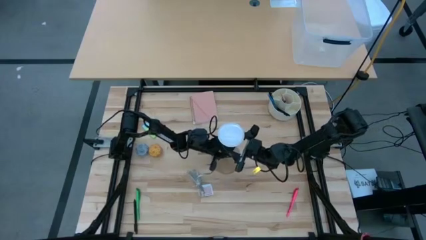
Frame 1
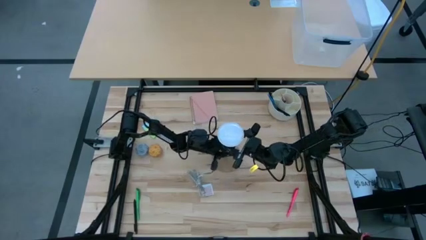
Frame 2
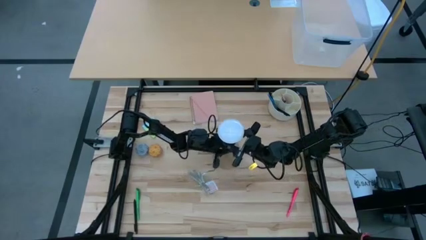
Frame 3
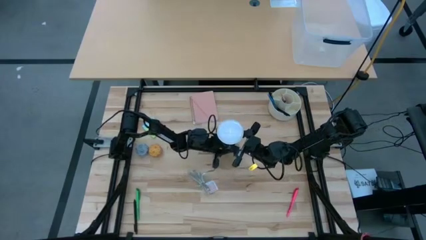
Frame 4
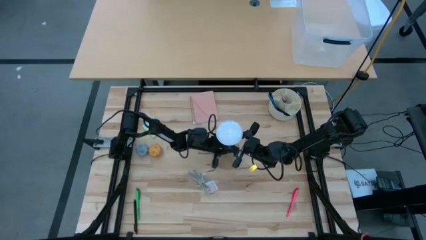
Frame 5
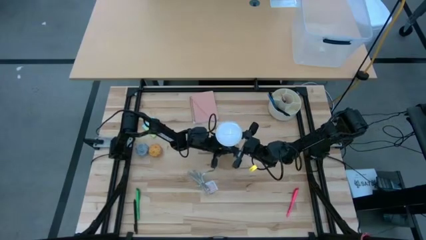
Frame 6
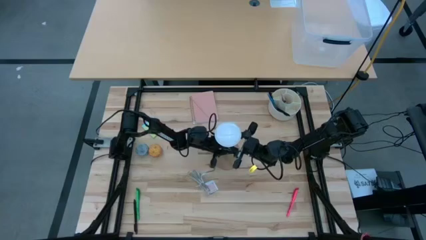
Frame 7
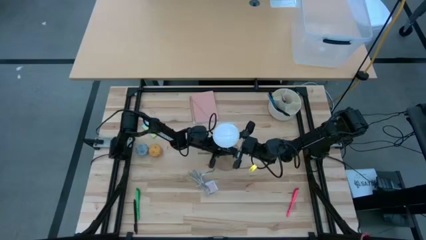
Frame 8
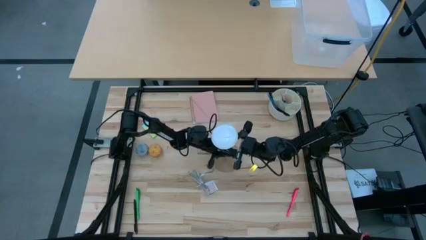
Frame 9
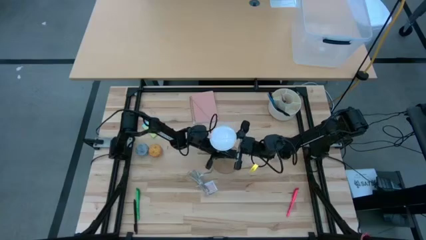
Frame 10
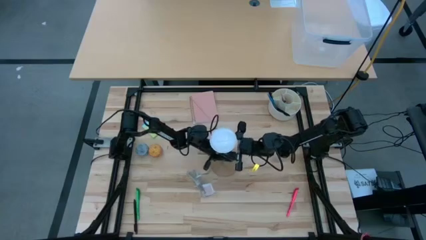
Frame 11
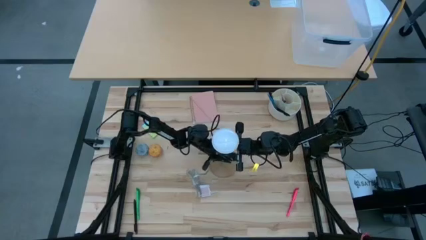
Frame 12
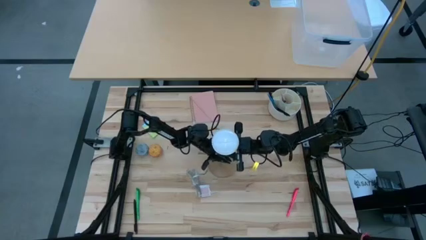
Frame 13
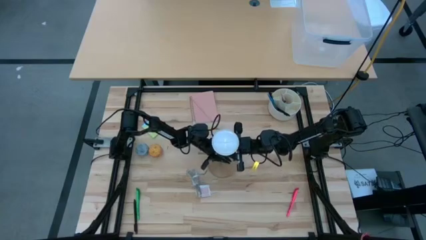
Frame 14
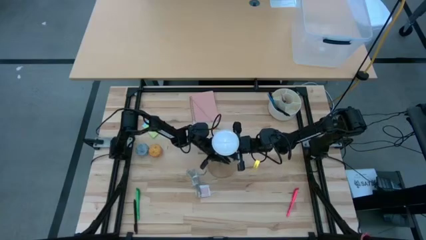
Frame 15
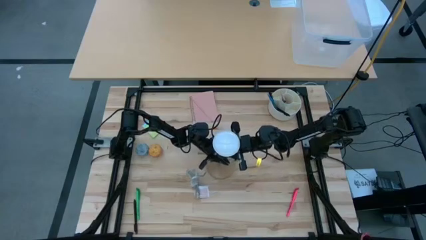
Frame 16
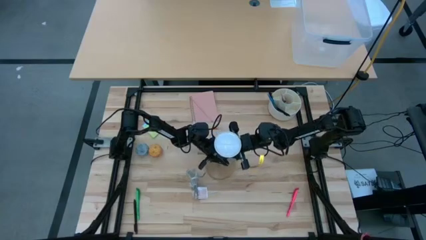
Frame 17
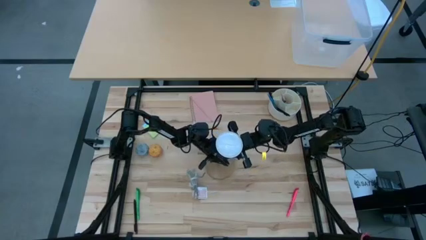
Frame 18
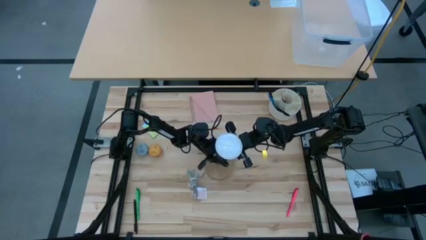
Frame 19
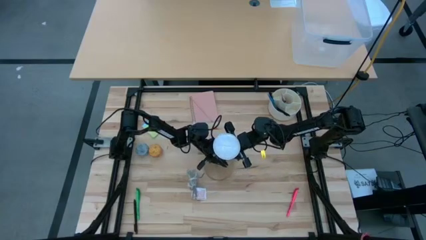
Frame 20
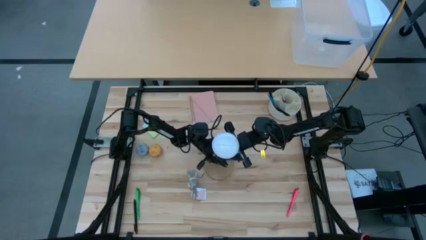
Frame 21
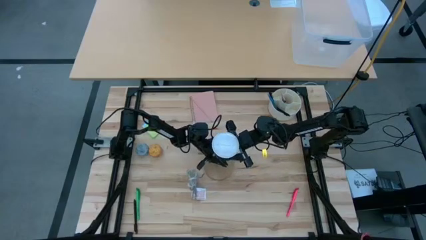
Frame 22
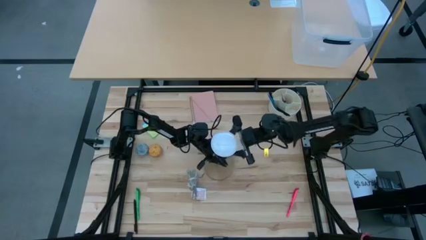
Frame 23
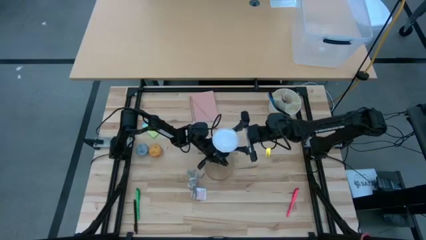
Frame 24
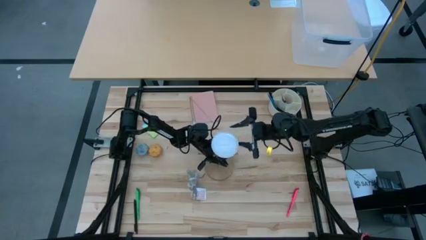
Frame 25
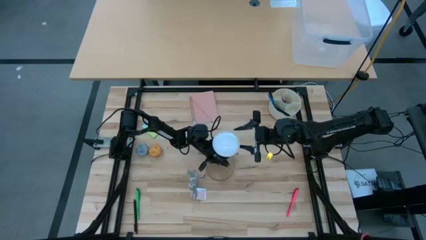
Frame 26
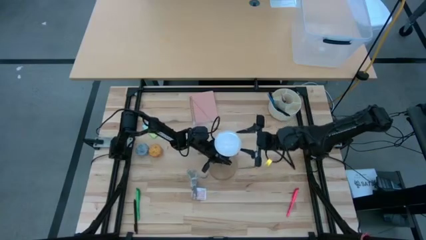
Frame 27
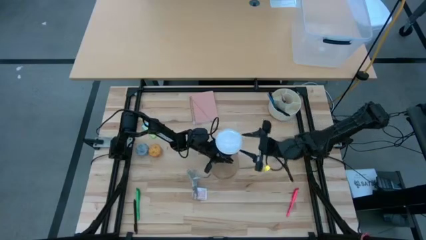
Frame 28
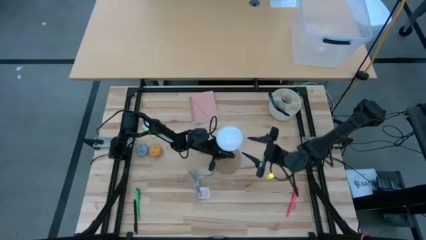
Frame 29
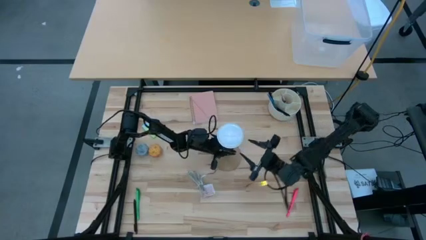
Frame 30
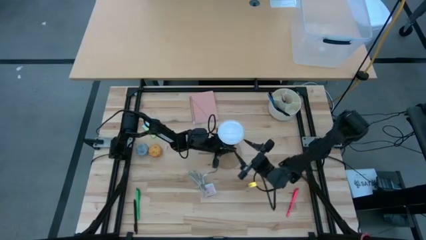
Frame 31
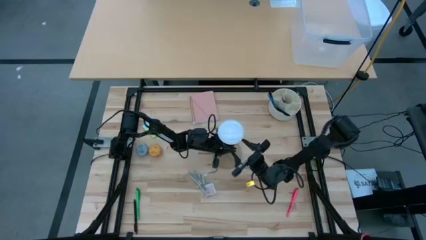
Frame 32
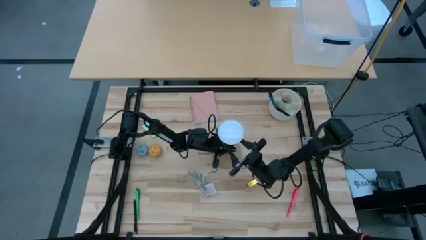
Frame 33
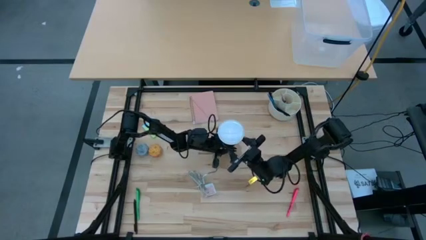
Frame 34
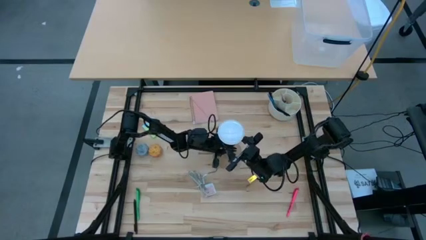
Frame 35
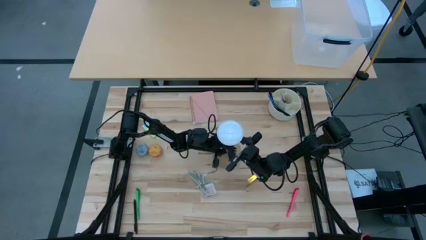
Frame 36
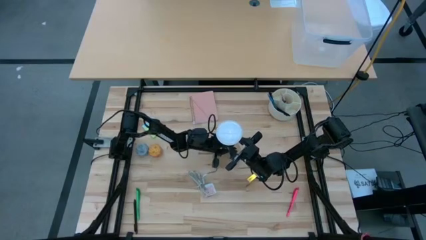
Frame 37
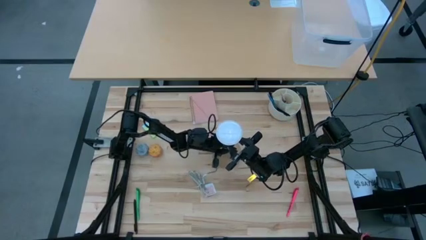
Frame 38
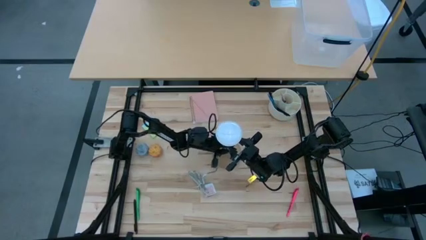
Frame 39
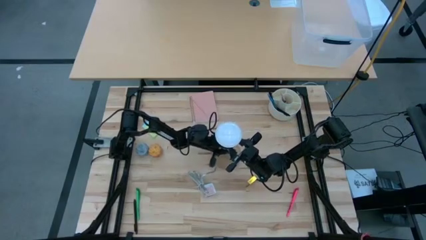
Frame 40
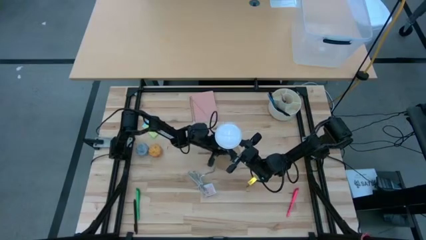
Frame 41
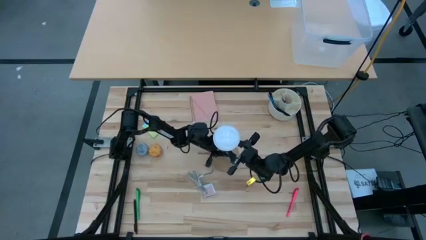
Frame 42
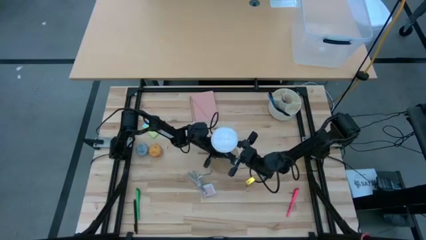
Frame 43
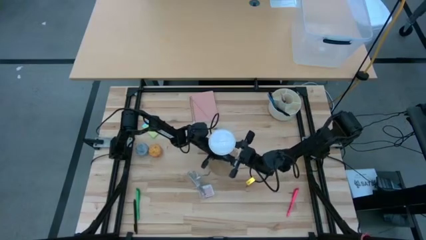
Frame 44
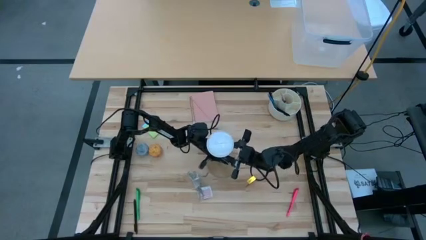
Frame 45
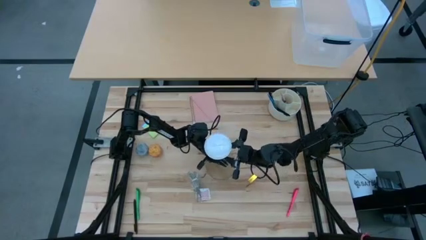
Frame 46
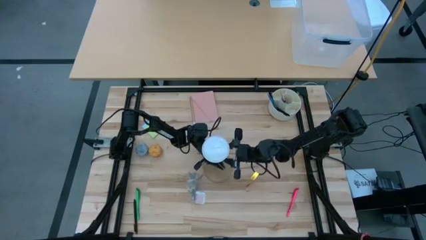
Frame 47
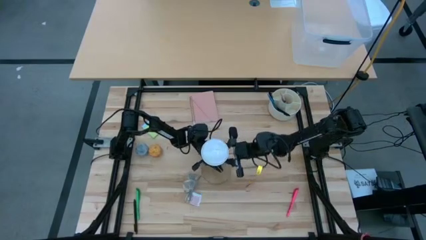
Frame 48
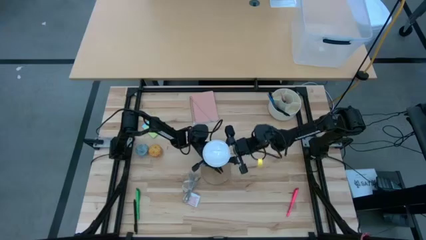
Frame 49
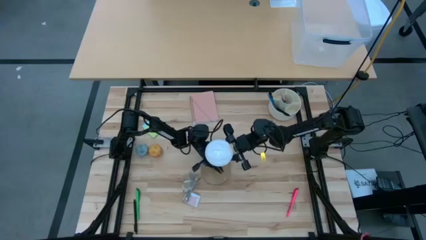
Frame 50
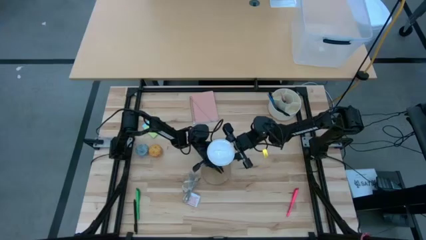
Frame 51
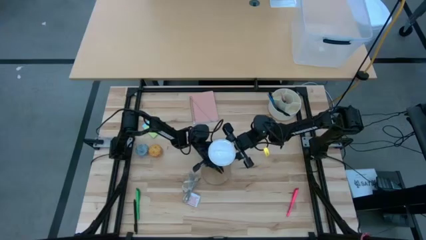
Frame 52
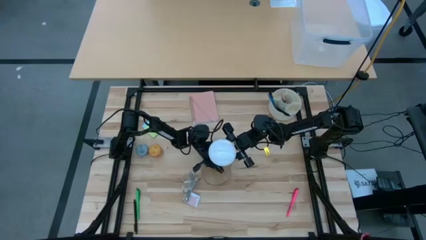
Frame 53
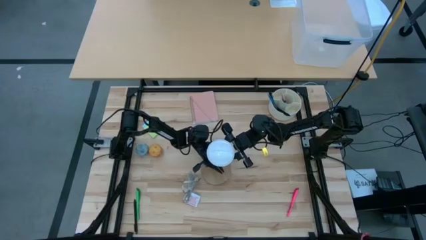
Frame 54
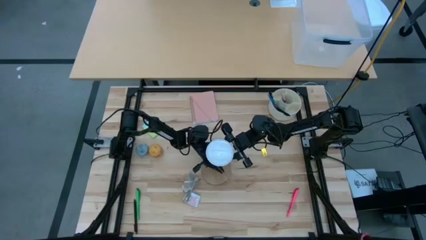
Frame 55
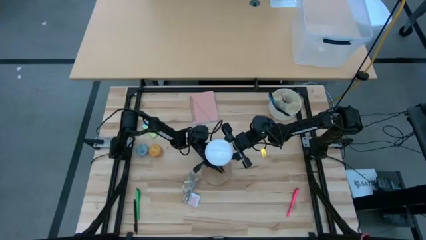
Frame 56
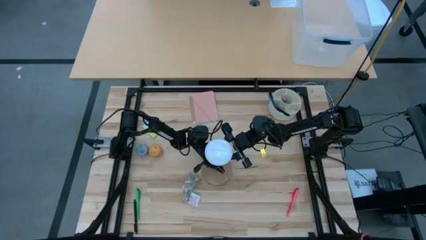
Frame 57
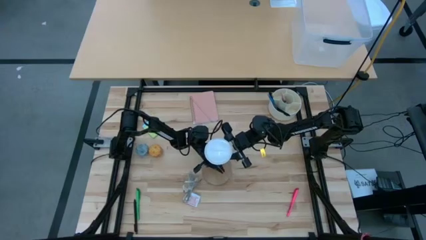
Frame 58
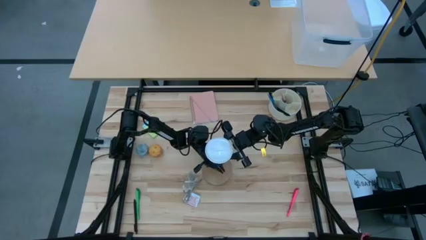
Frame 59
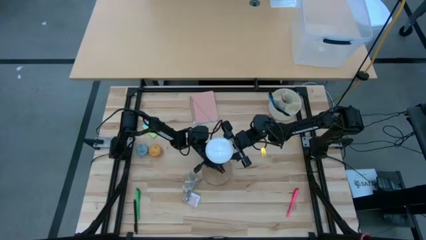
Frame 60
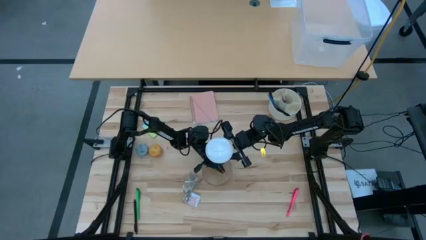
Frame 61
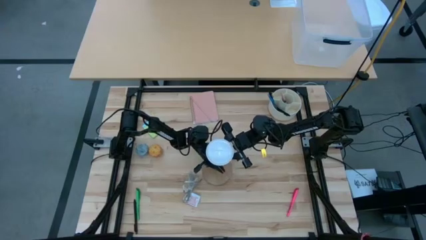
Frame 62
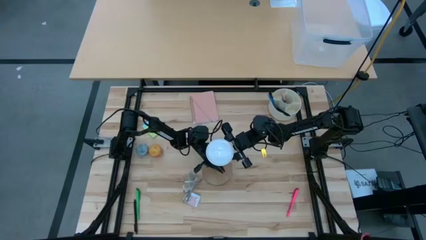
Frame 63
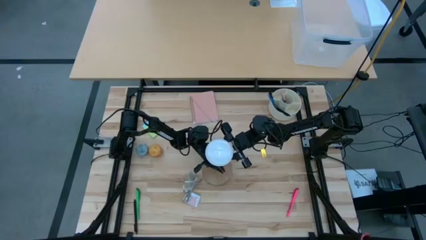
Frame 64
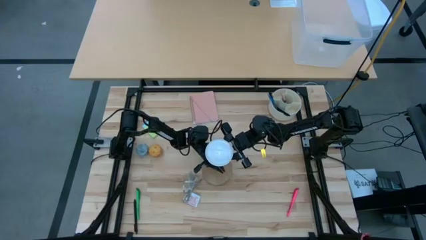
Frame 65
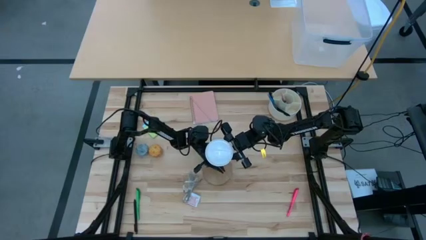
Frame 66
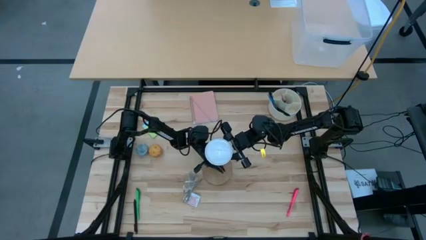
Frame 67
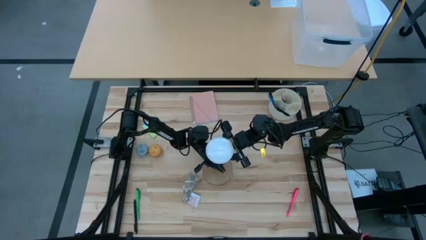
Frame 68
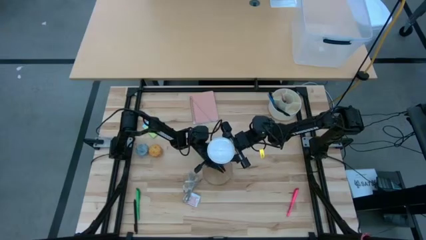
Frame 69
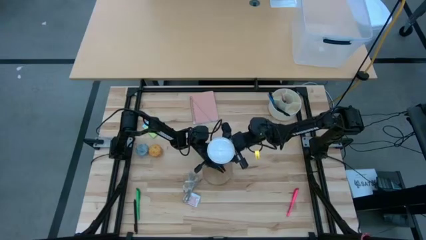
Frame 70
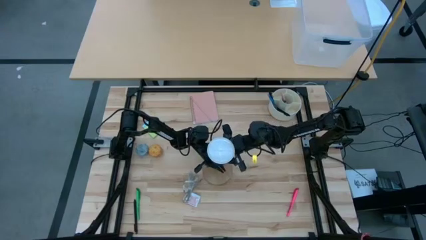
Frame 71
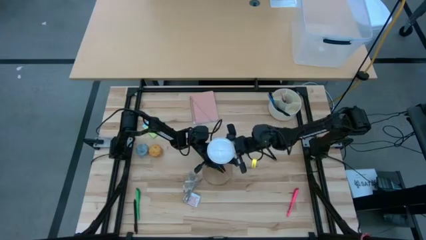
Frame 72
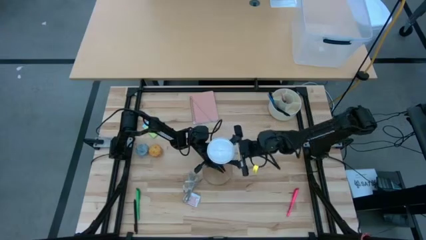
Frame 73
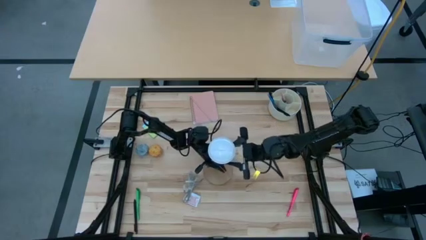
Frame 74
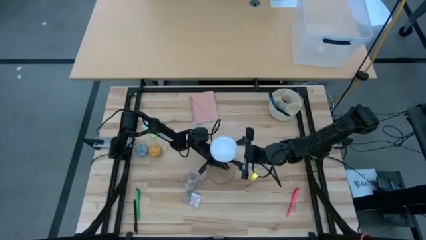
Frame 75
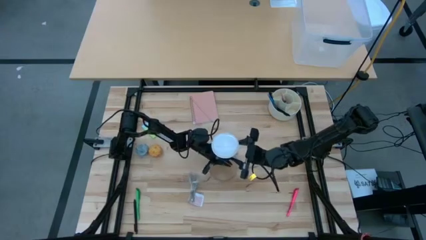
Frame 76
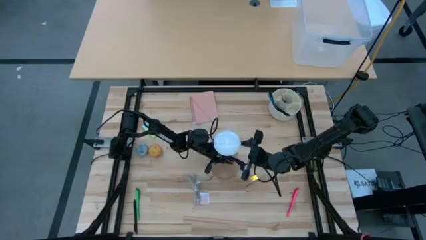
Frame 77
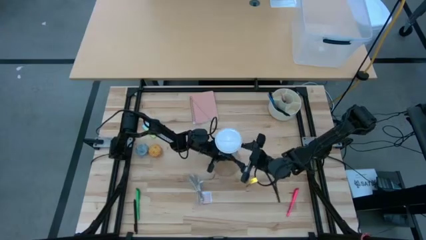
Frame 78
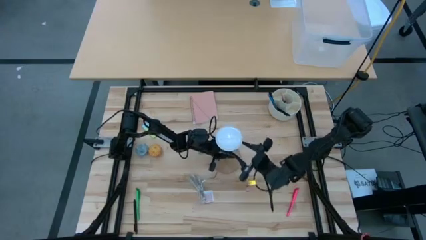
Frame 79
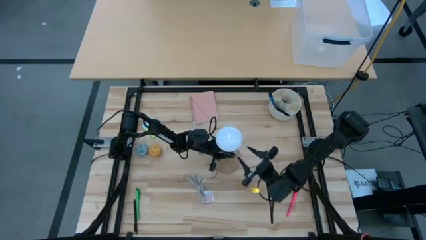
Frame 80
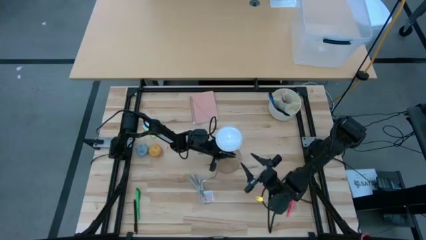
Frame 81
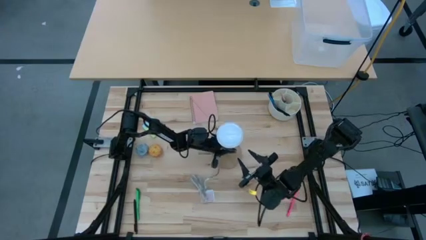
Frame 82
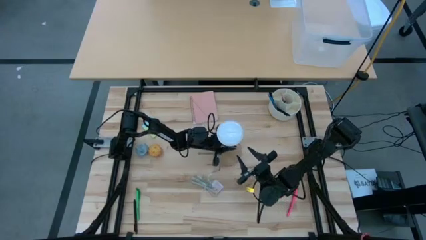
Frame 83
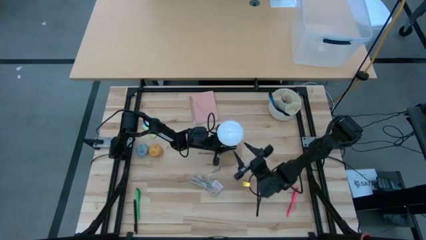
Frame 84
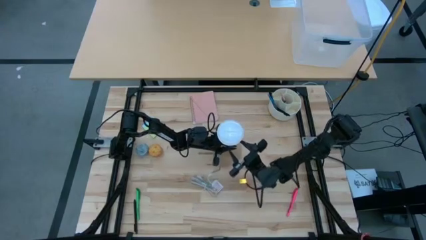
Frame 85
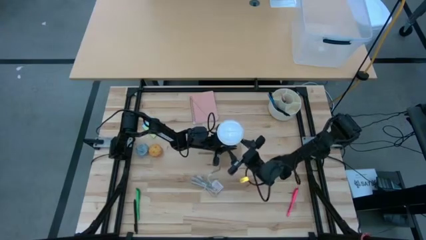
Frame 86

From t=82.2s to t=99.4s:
Task: Screw lightbulb
Remove the lightbulb from the lamp
